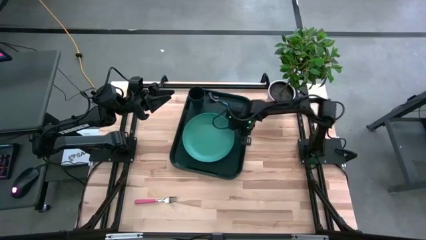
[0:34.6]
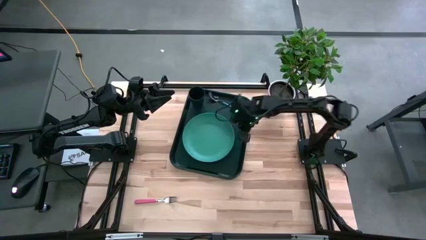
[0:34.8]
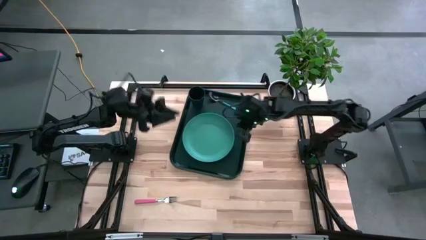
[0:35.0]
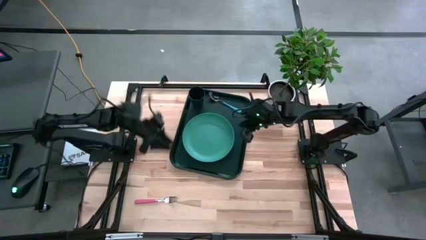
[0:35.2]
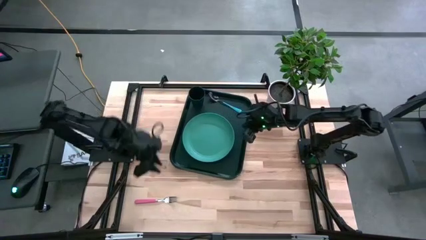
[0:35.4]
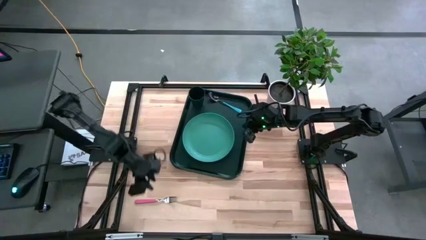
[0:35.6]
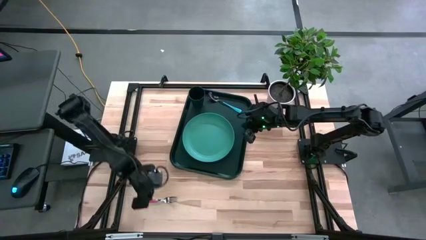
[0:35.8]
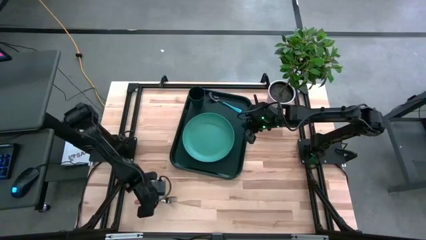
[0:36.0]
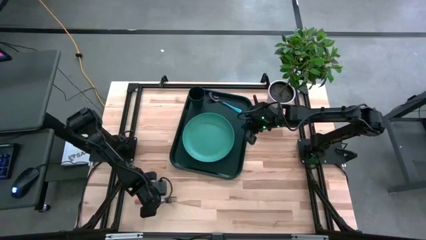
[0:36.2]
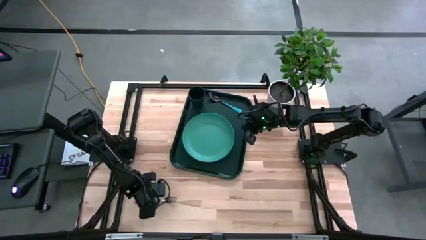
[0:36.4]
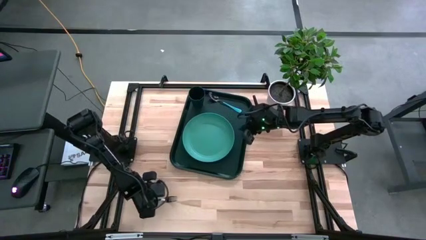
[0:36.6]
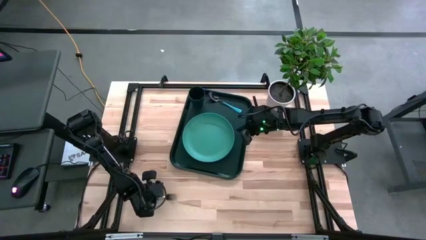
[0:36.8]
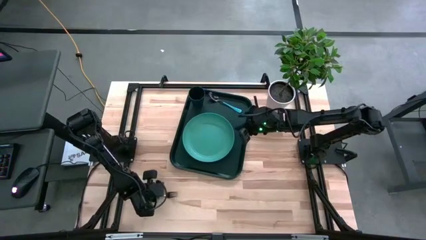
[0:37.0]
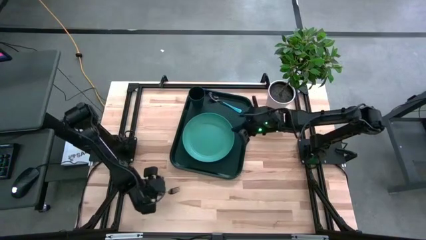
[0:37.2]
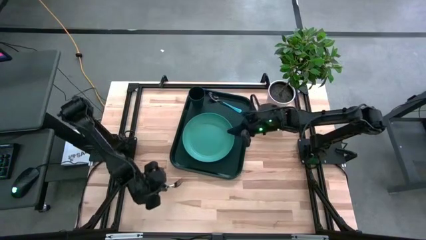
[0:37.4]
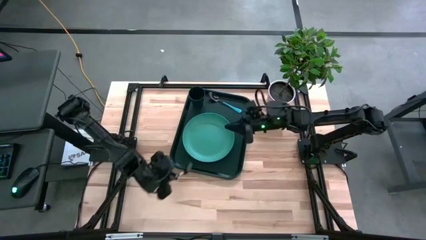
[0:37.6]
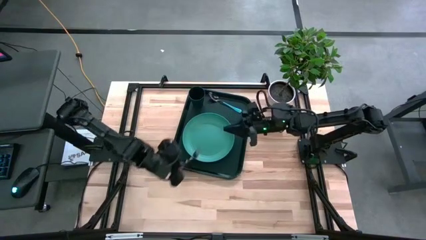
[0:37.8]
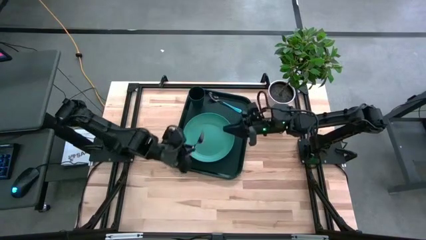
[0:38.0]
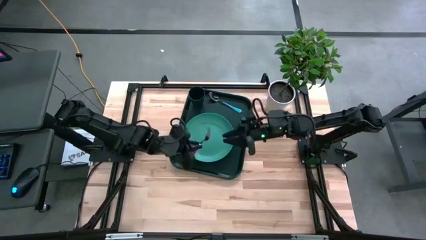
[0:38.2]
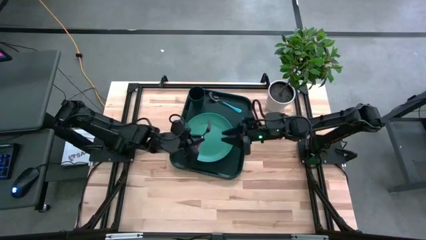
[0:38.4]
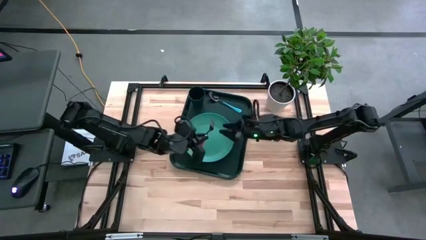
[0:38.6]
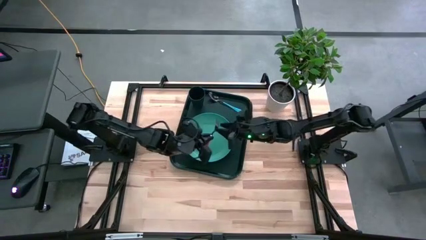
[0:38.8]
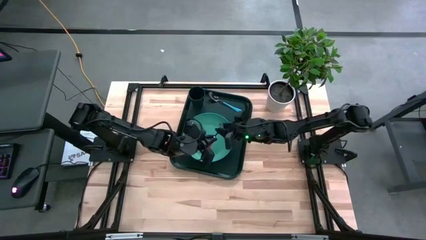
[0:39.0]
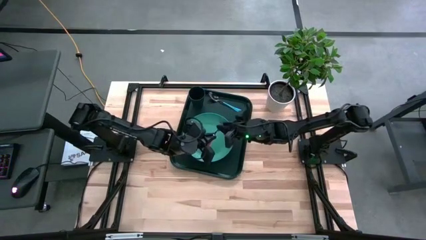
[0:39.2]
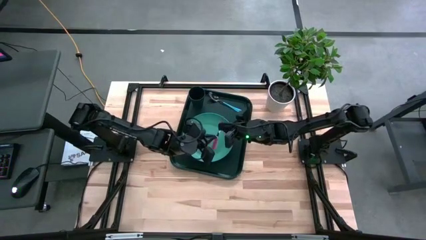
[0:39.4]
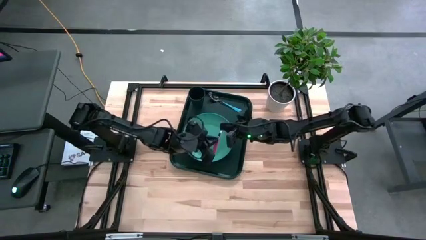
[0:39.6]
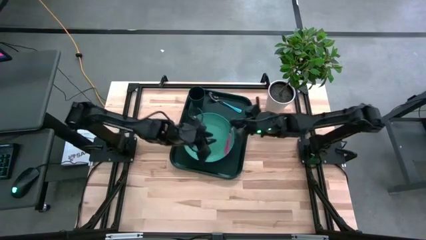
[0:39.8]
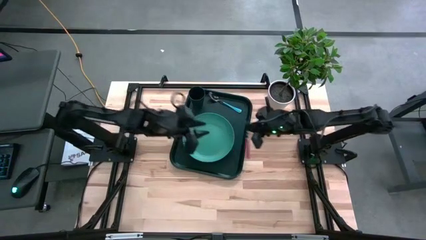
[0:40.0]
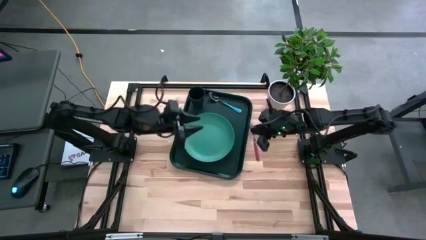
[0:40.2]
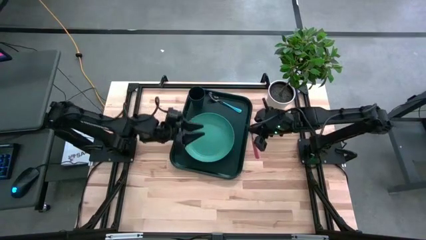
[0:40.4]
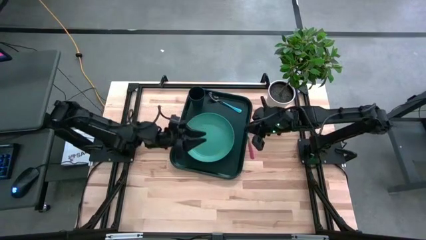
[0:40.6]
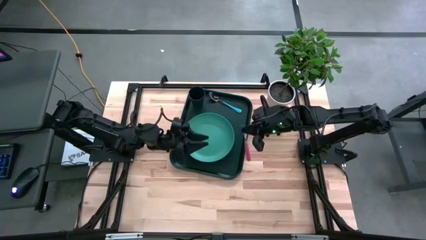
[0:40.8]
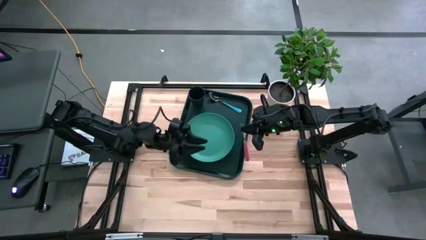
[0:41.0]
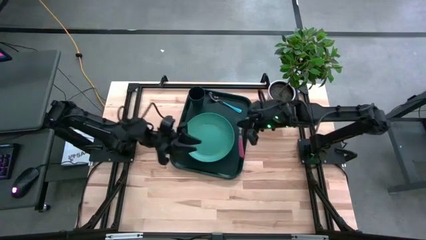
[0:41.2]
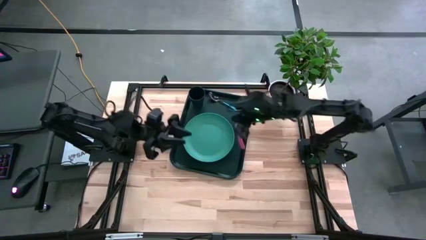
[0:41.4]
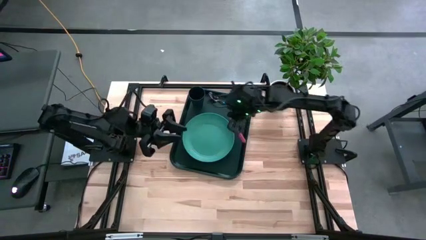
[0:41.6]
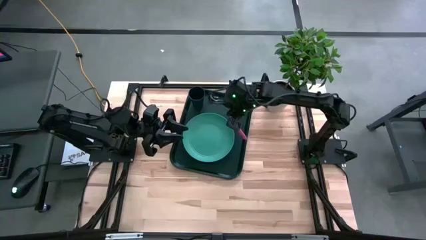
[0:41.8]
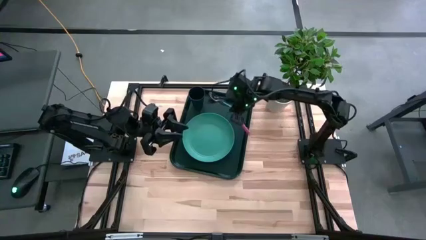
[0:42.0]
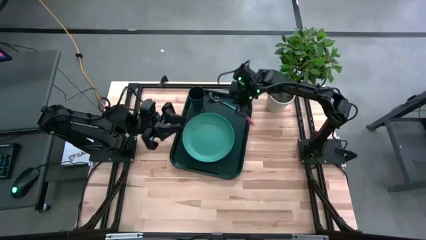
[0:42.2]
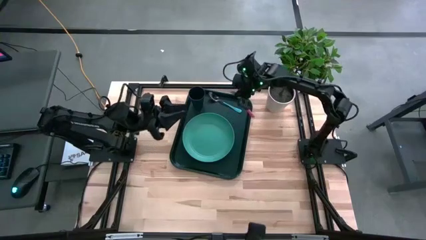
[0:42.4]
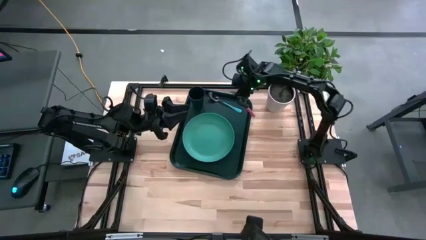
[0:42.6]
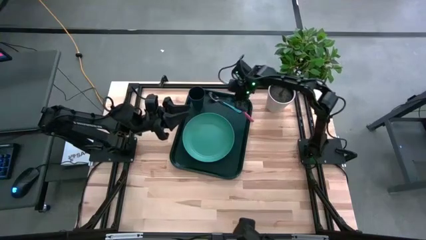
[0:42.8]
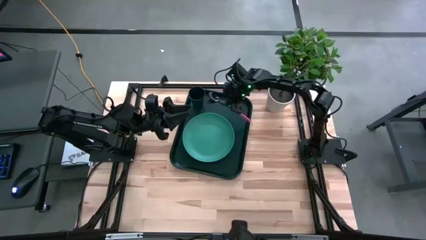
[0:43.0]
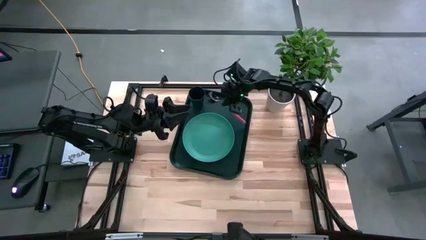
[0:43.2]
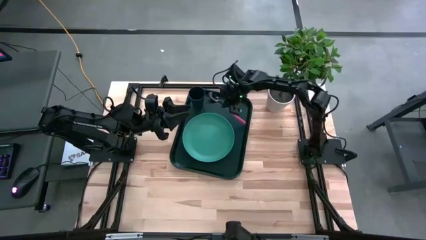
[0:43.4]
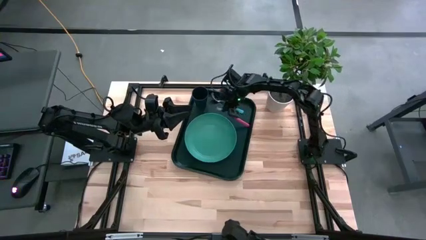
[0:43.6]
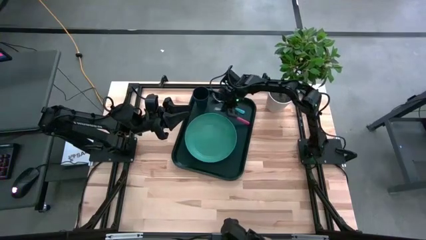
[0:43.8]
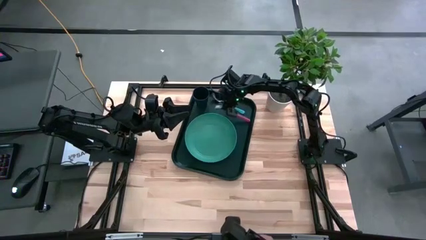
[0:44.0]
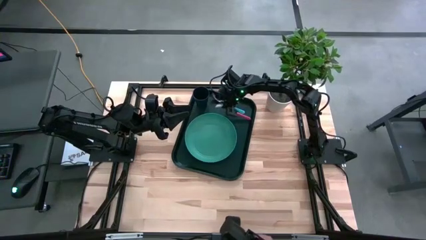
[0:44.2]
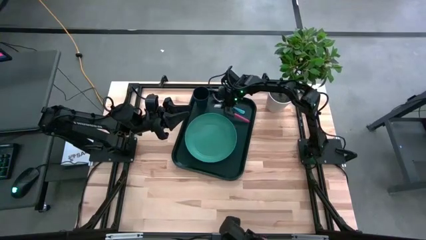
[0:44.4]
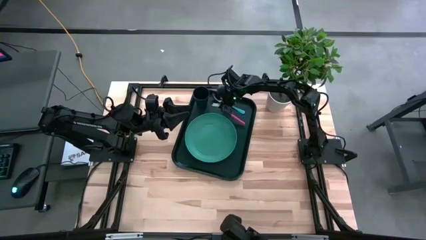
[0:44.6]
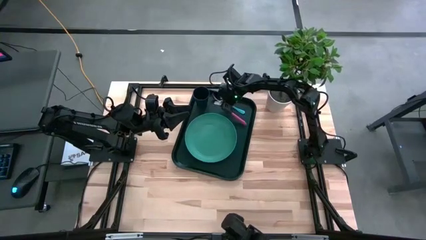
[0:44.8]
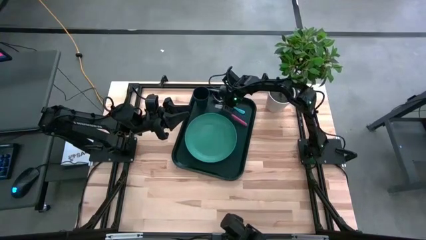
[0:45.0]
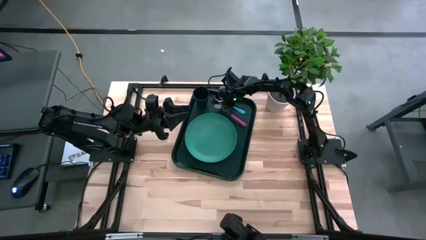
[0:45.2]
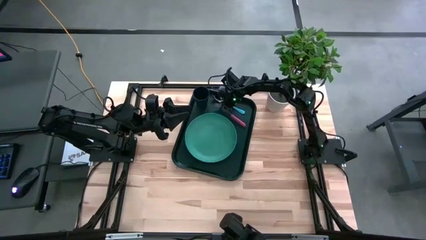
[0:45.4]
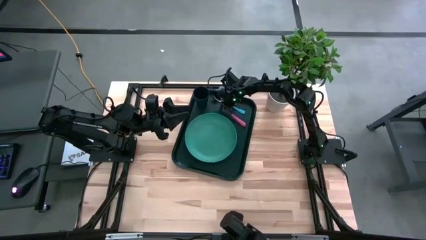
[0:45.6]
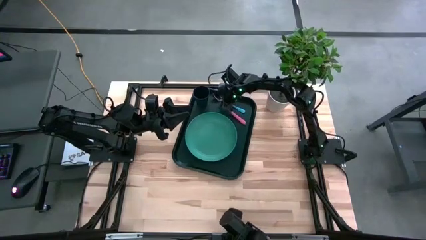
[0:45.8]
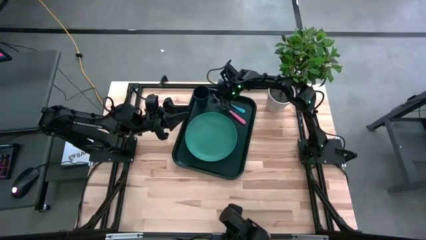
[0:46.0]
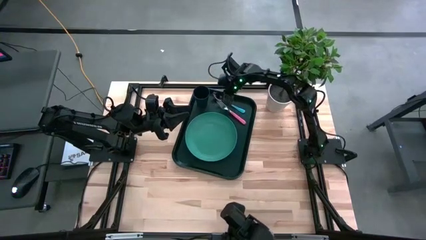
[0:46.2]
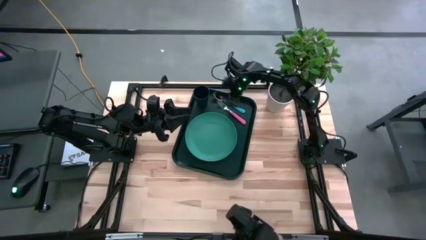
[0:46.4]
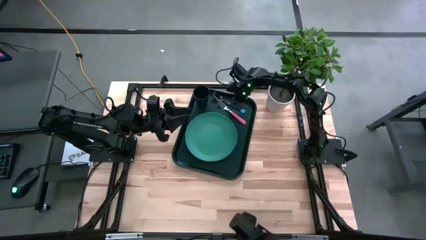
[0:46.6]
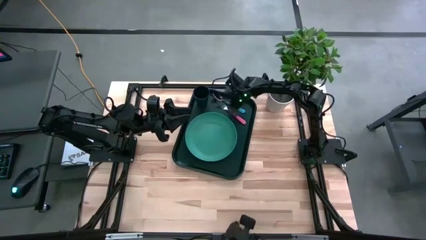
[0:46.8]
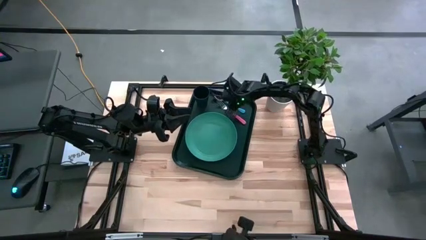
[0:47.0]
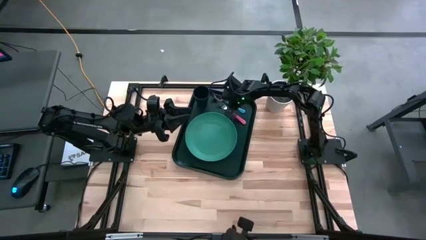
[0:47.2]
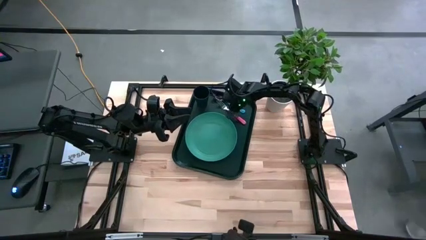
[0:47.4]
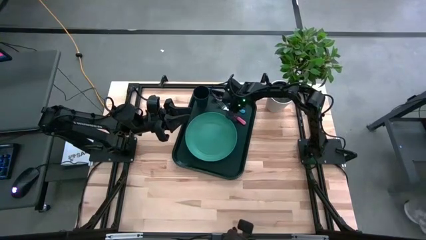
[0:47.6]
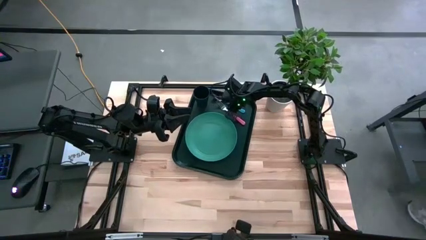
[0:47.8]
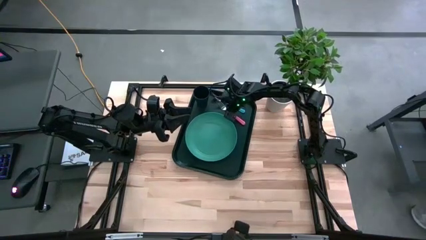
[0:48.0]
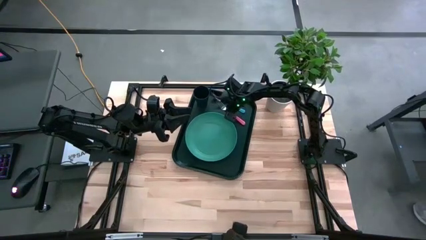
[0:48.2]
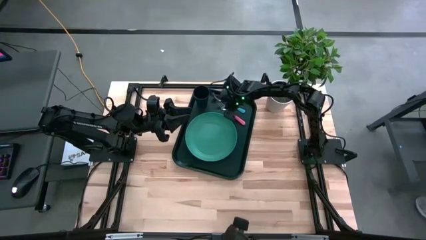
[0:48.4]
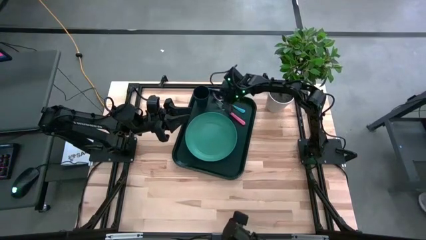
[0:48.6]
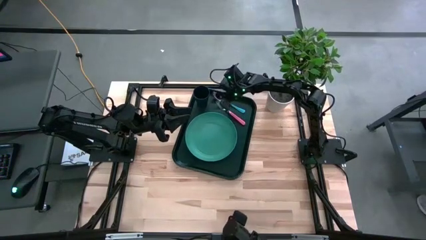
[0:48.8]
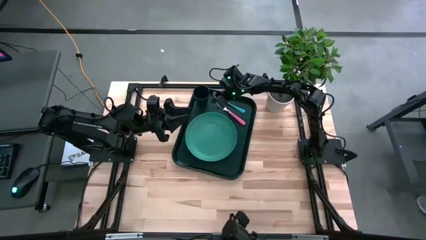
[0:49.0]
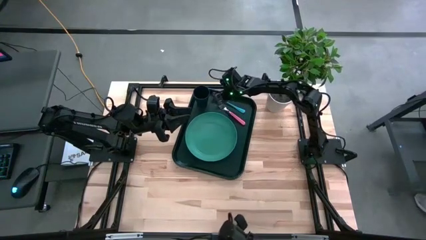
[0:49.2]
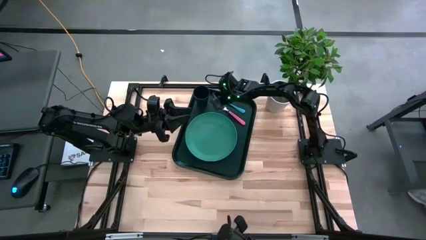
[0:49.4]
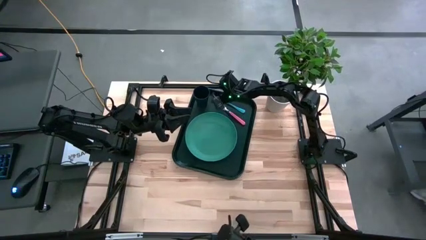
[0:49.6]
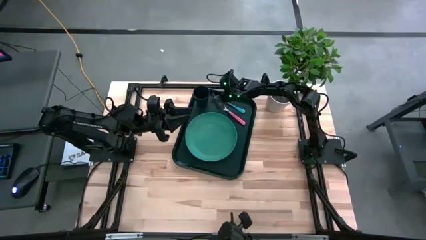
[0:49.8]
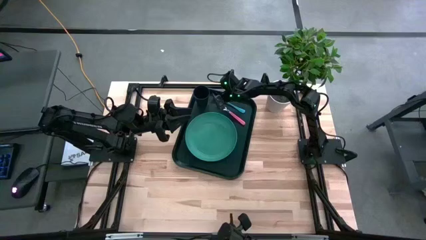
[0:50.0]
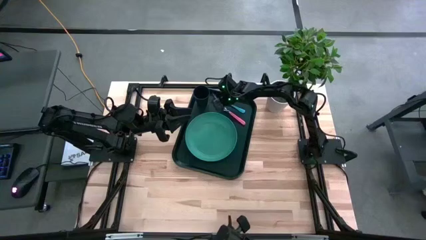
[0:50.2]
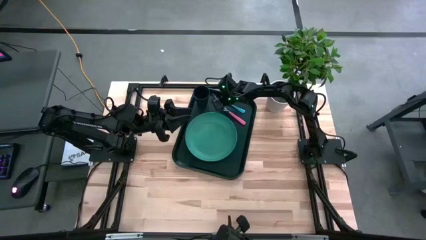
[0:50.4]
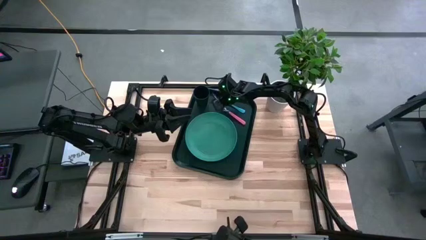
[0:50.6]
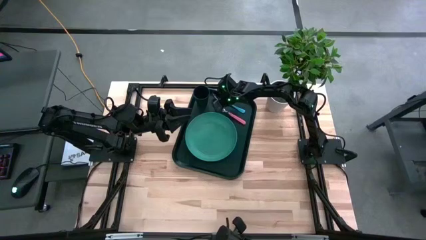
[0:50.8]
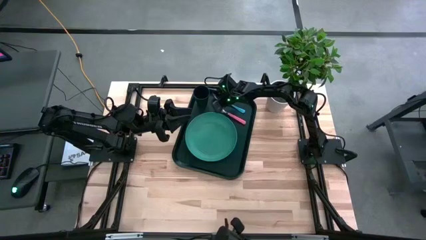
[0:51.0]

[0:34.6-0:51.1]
Task: Pick and place plate/cup/fork/spoon on tray
Put the pink fork on the black serving tray to the bottom of the blue spoon

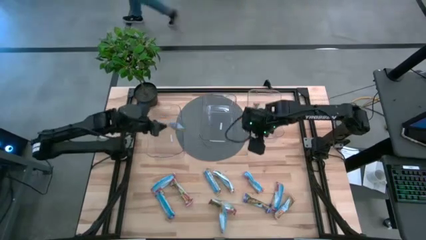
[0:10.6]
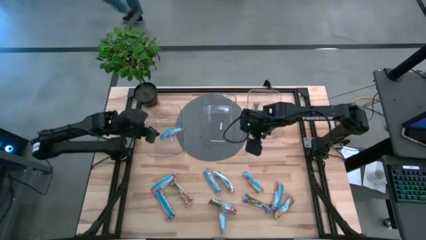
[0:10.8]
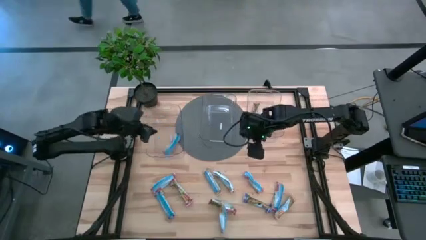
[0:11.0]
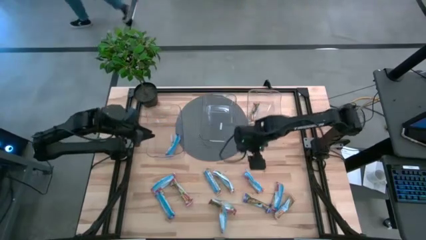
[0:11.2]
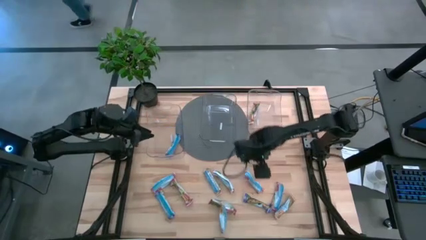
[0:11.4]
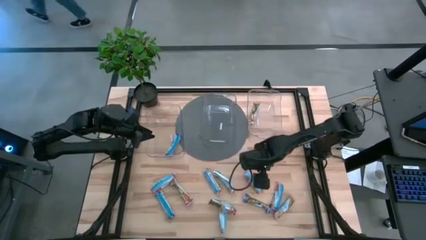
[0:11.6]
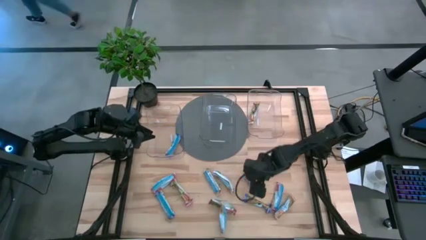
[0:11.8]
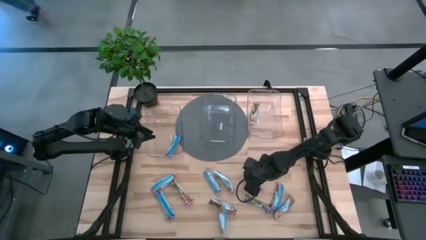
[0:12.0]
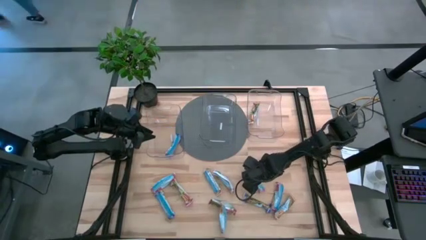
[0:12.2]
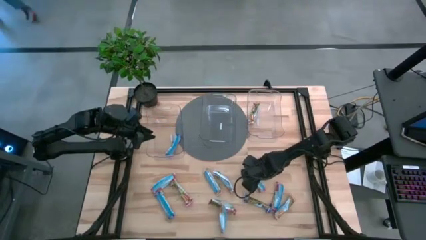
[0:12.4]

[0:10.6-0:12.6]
Task: Pick and place Granola Bars by type
Put the red granola bar into the middle transparent bin
